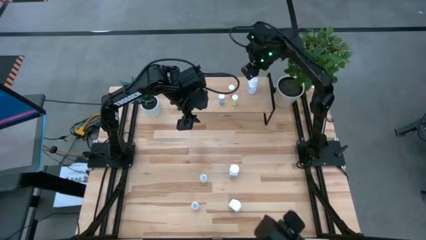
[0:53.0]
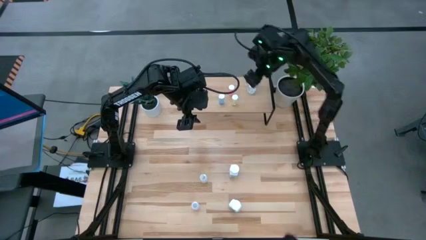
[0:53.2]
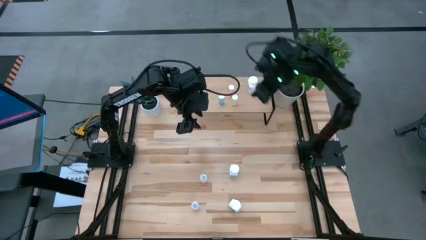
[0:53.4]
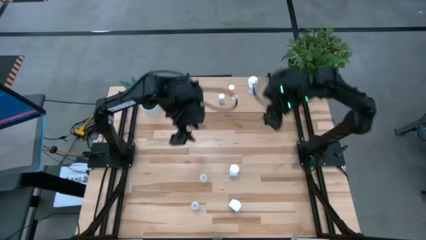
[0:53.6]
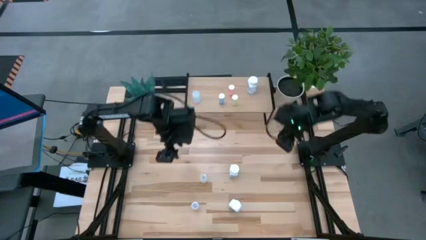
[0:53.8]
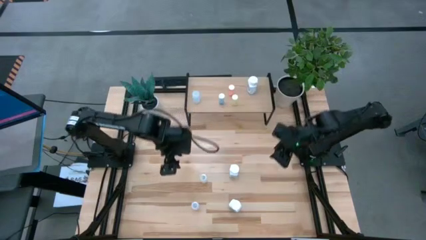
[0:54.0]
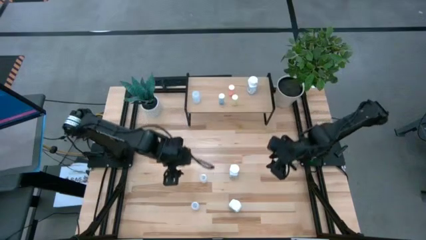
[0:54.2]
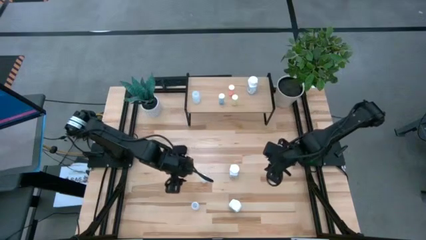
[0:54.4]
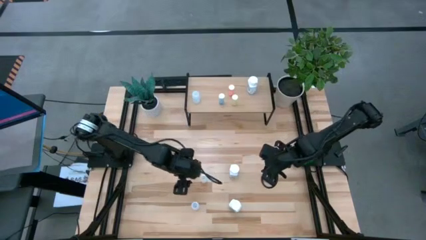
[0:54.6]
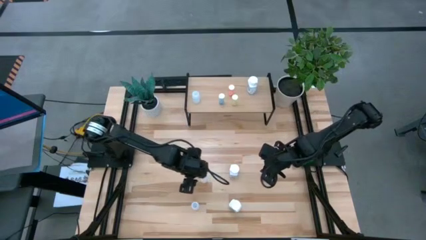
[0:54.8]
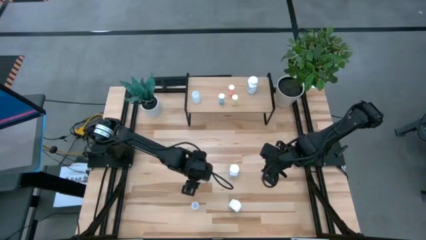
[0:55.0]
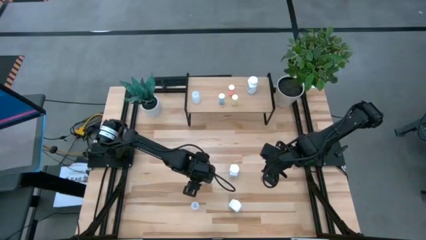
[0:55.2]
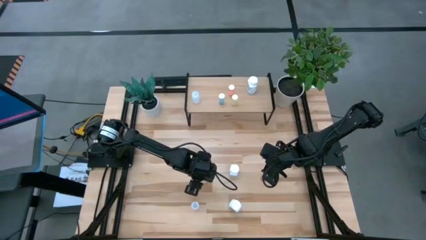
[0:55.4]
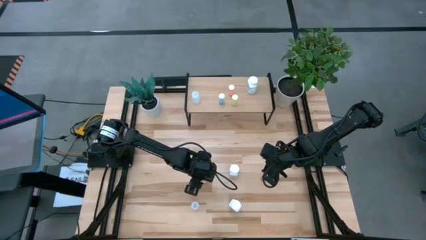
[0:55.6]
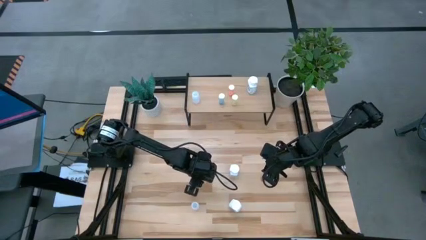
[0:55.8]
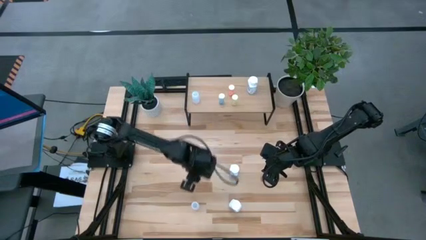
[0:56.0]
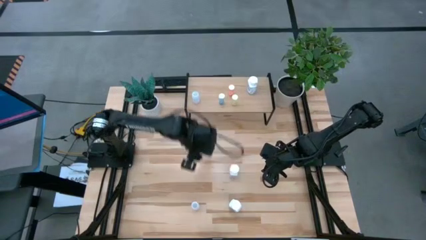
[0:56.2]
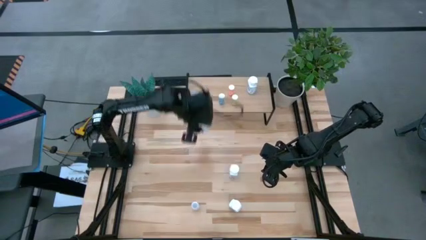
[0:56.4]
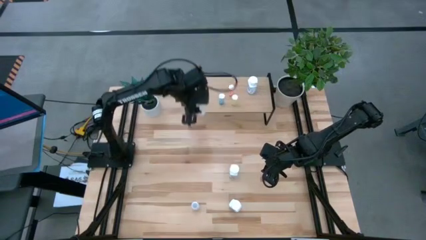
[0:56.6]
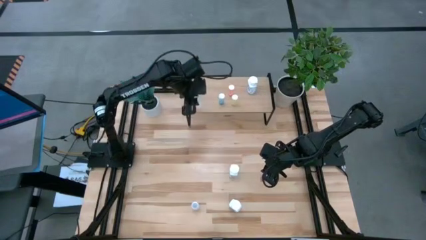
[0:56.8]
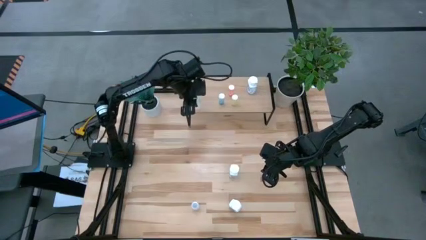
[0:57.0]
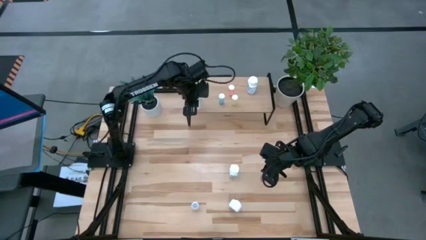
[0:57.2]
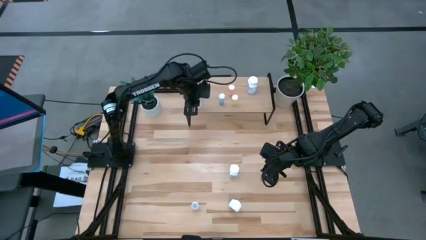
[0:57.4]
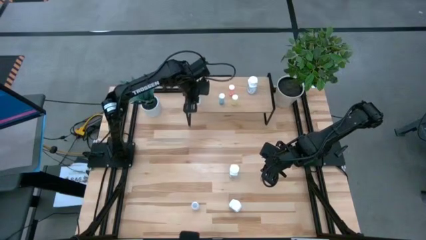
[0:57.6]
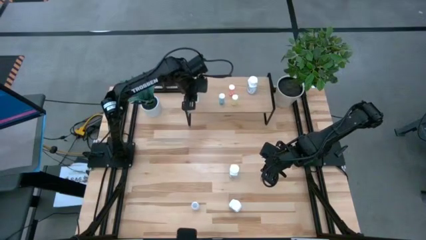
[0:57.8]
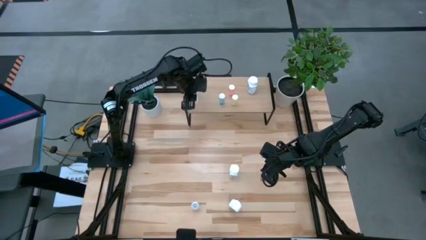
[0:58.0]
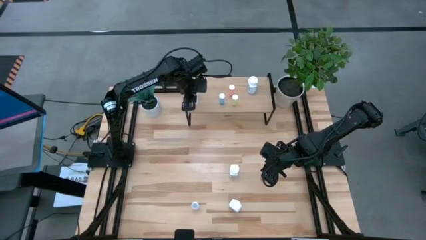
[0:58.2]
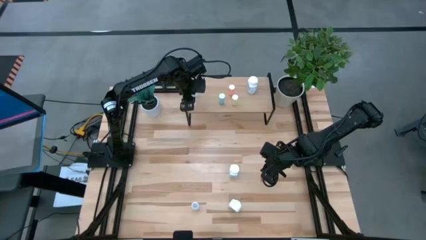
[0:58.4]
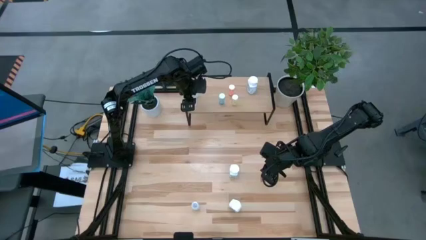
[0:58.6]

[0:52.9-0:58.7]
Task: Pick and place medicine bottles onto shelf by color
Put the top small white pill bottle on the shelf

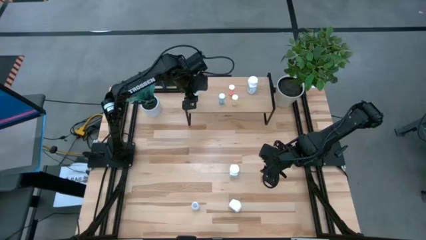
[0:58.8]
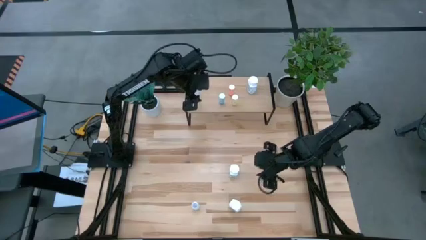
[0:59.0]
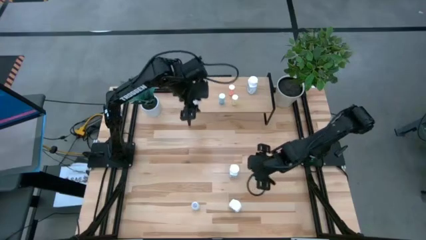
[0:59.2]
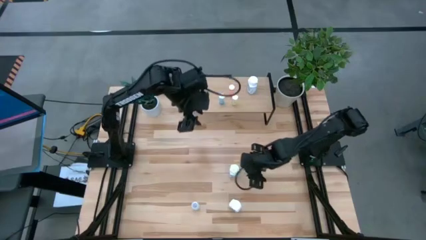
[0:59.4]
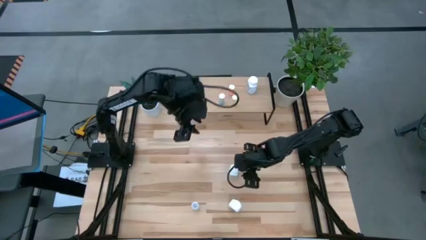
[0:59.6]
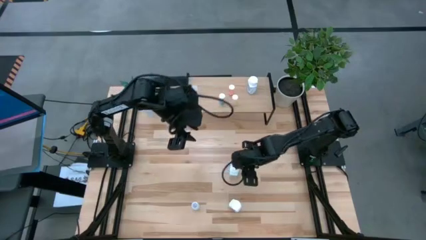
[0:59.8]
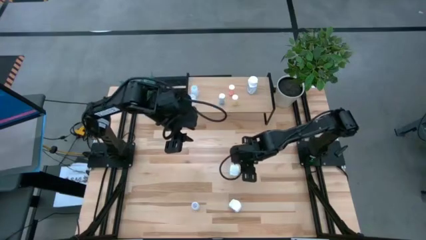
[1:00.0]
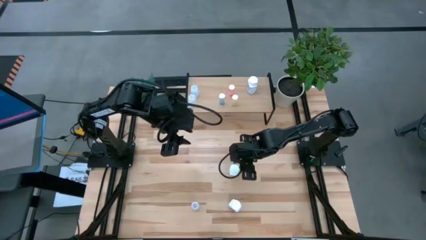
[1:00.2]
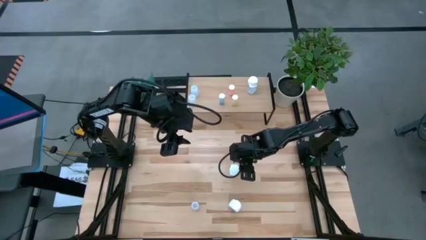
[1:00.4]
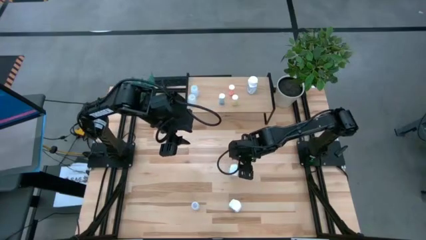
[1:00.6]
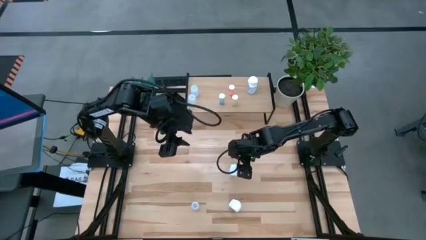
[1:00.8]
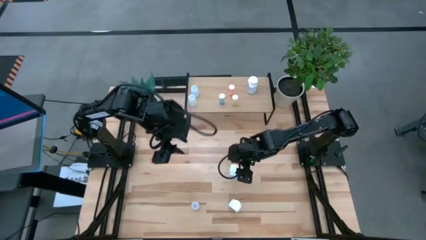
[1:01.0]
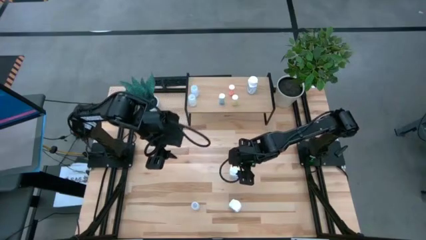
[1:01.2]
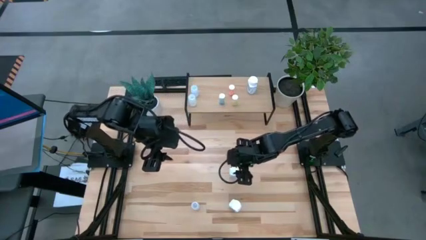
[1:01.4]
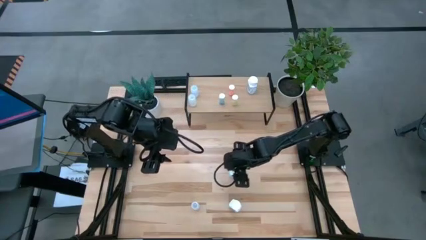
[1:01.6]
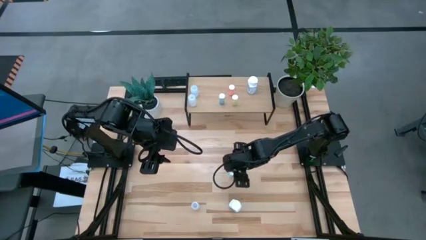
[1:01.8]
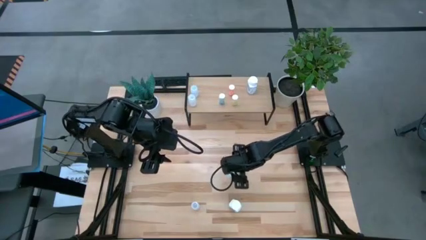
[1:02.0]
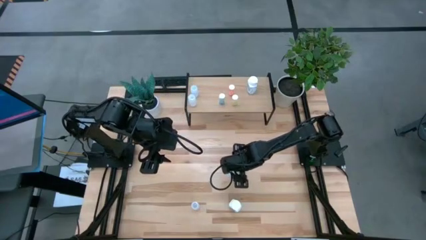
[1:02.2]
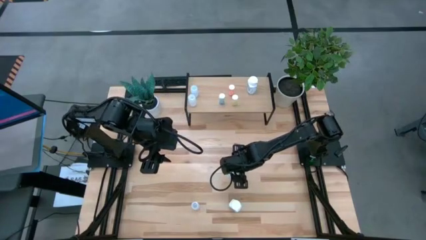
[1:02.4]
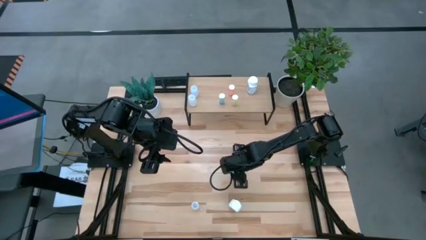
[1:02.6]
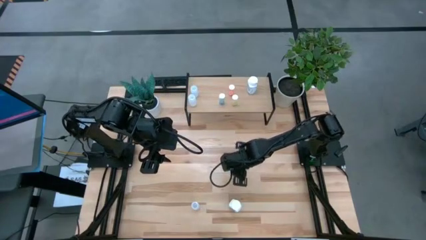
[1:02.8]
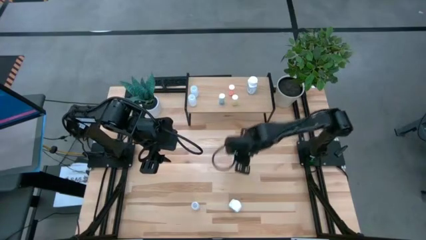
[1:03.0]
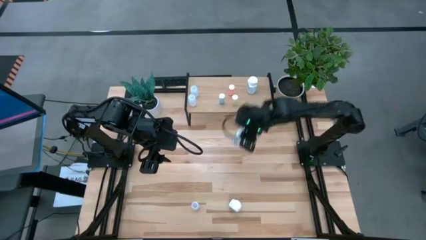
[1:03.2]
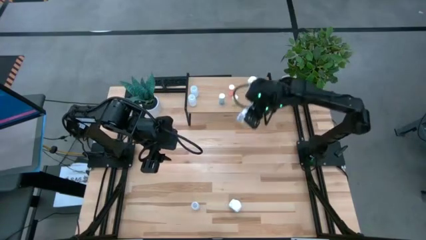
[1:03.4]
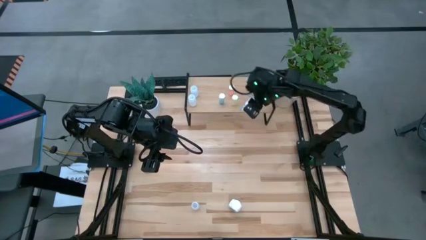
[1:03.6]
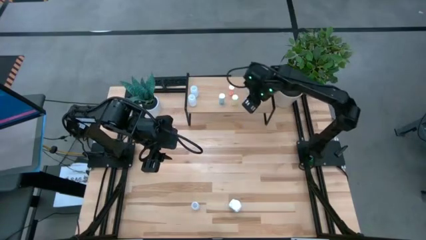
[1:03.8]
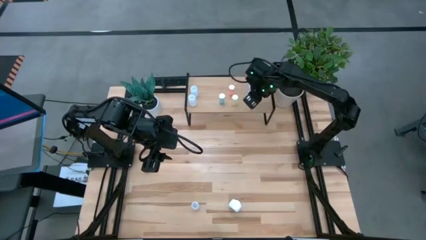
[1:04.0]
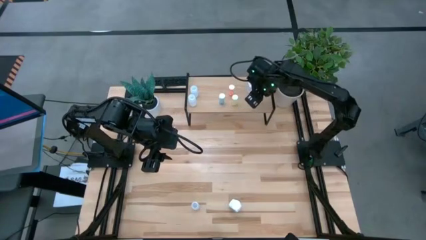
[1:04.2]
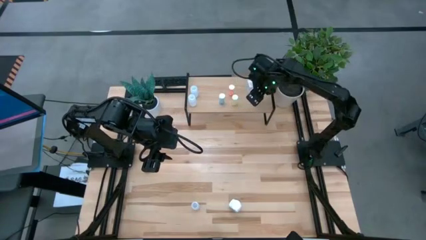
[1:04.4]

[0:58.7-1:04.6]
Put the top large white pill bottle on the shelf

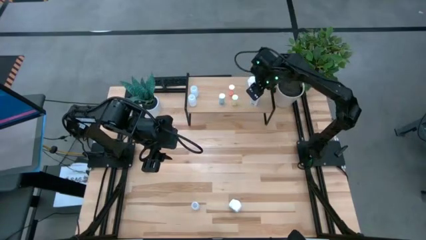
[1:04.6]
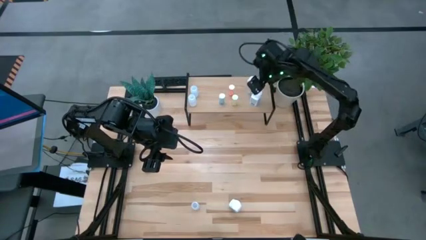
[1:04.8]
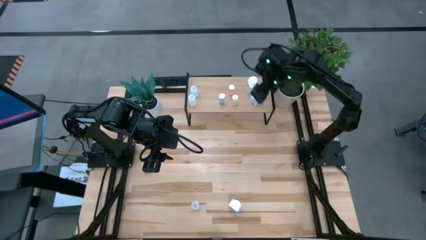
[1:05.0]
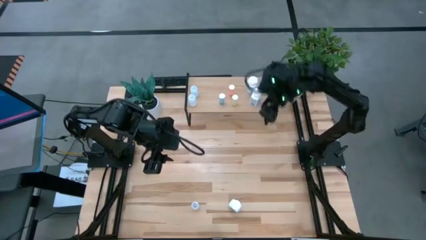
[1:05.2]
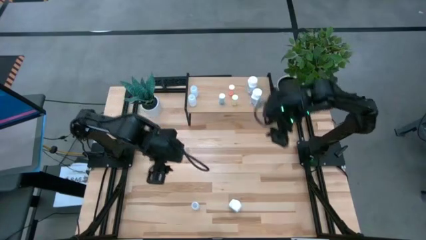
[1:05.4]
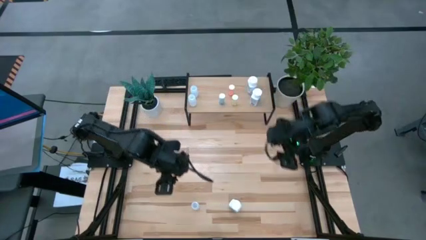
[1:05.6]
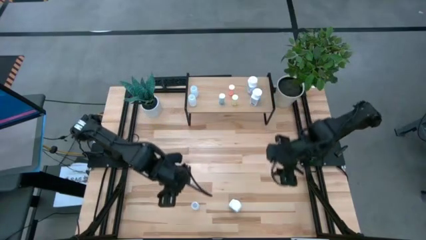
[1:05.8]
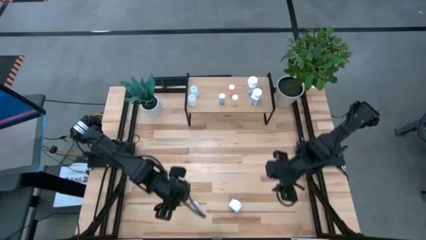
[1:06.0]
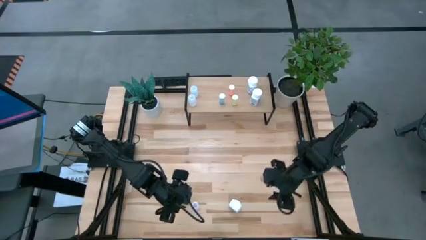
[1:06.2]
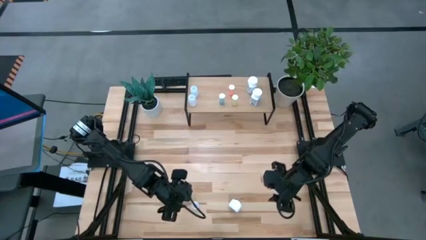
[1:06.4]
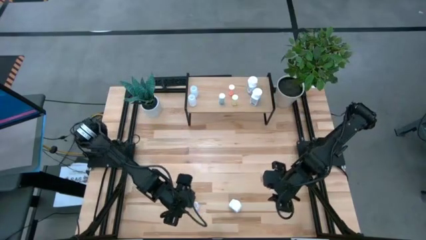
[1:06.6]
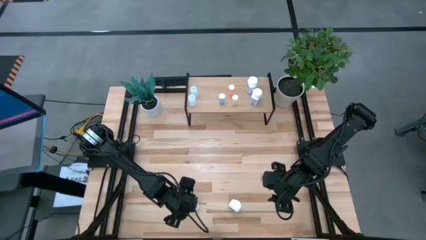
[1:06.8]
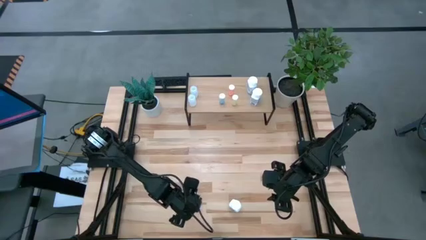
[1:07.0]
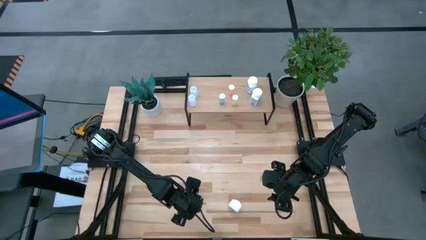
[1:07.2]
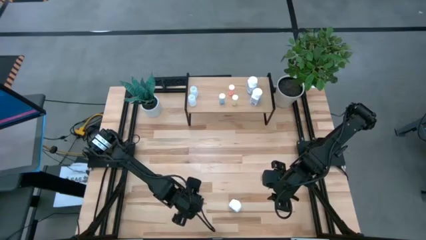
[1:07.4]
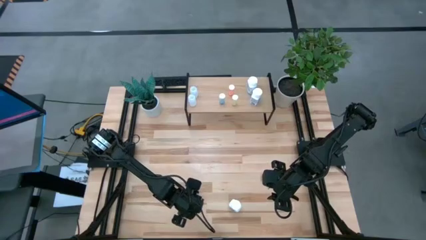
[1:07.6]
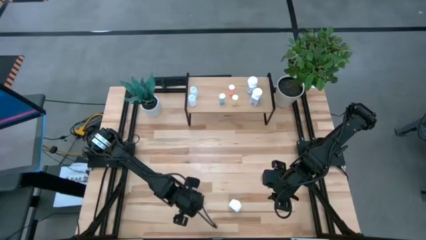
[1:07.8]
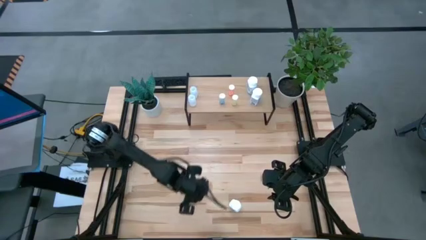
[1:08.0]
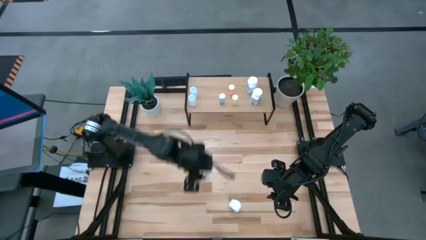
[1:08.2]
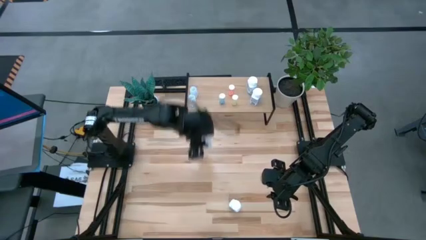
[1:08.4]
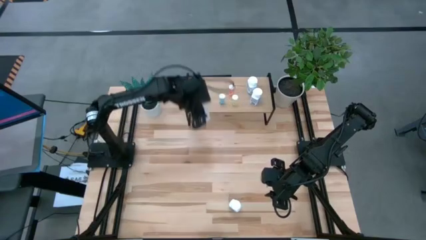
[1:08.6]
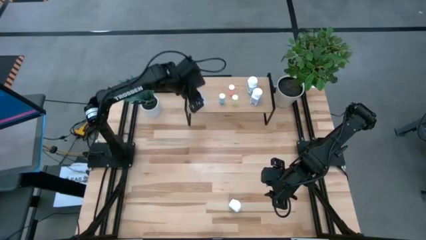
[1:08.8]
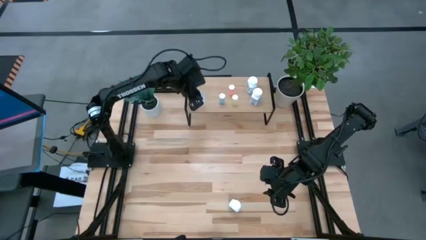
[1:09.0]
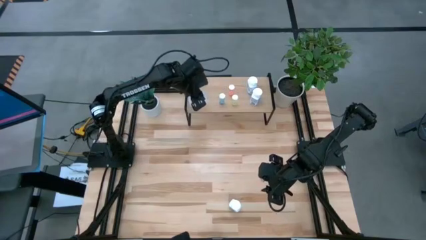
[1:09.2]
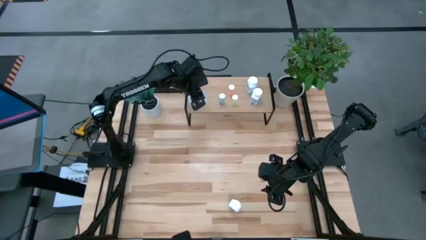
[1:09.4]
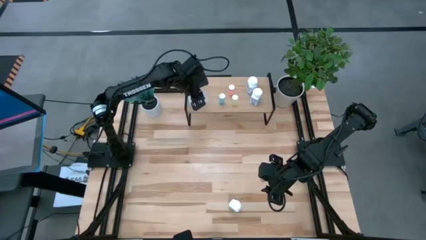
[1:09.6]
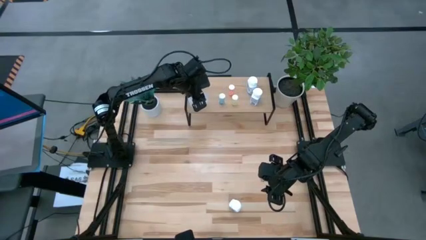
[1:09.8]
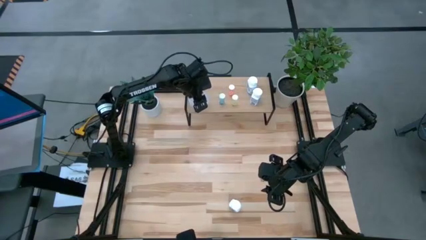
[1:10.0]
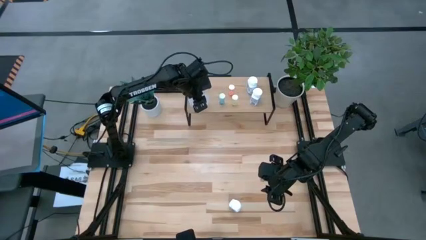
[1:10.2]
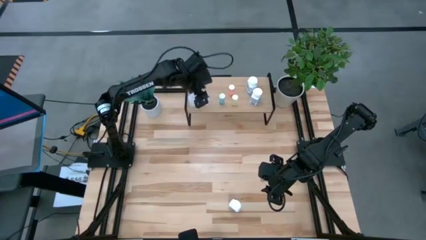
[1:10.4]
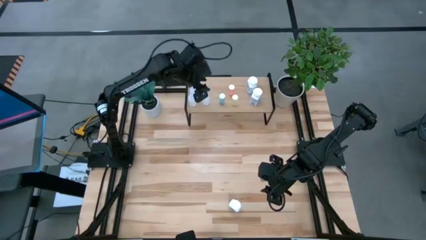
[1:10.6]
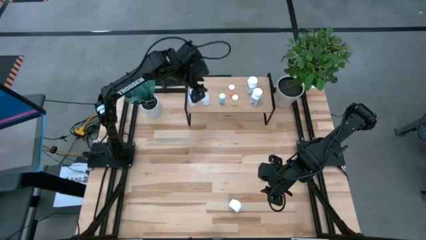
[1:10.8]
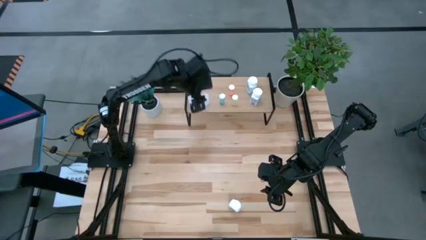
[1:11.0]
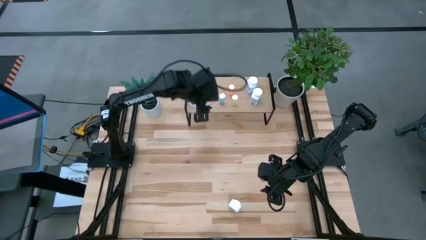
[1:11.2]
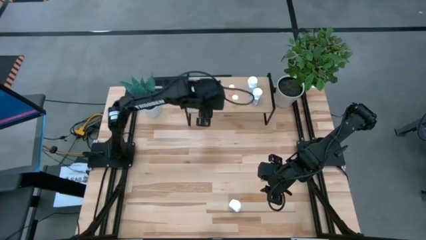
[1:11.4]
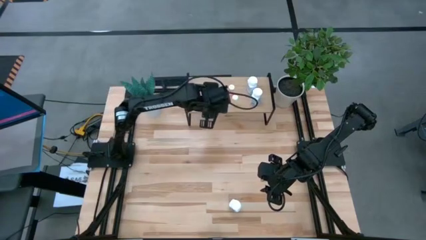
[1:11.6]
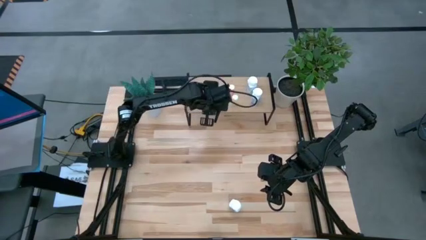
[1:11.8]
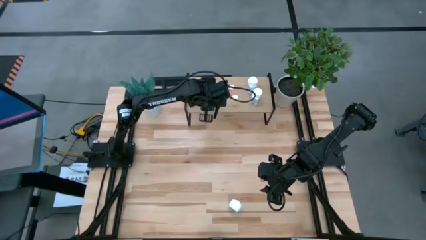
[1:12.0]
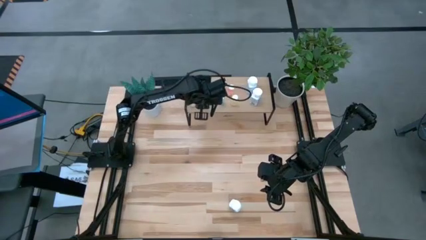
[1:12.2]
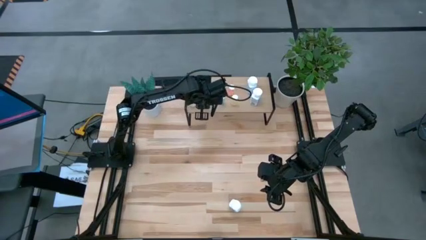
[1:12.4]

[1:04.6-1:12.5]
Put the small white pill bottle on the shelf
